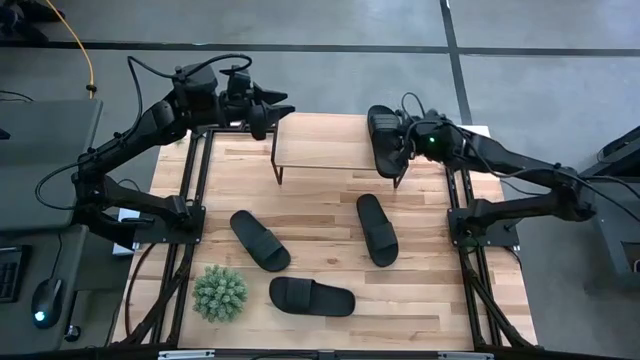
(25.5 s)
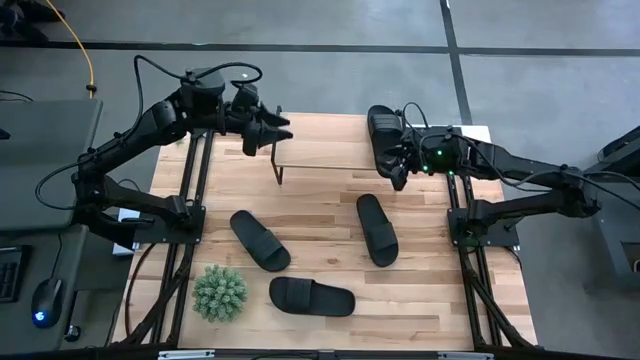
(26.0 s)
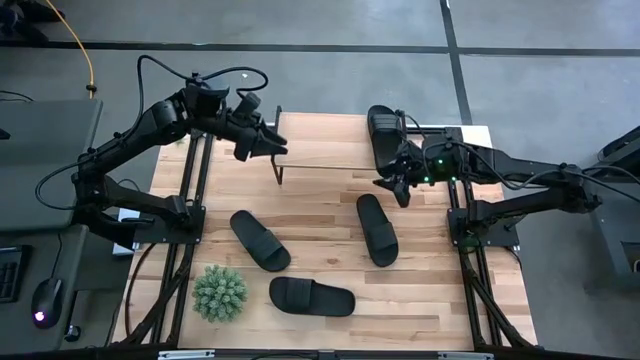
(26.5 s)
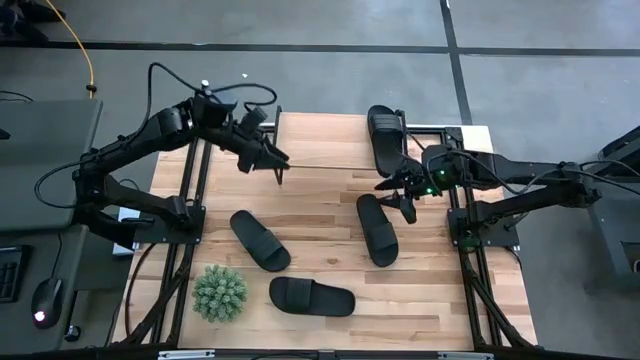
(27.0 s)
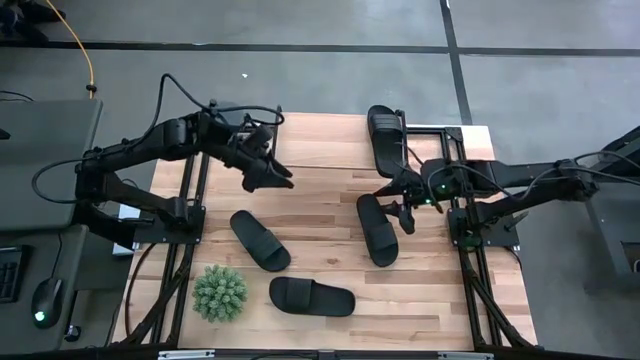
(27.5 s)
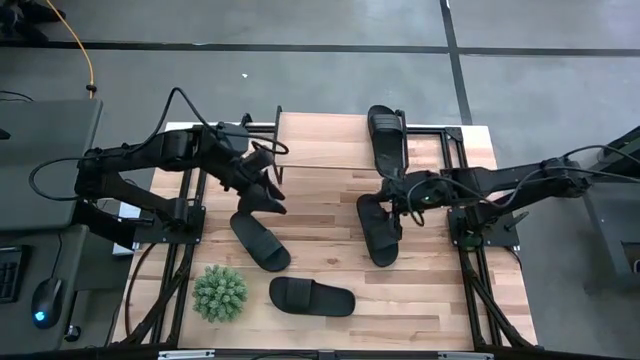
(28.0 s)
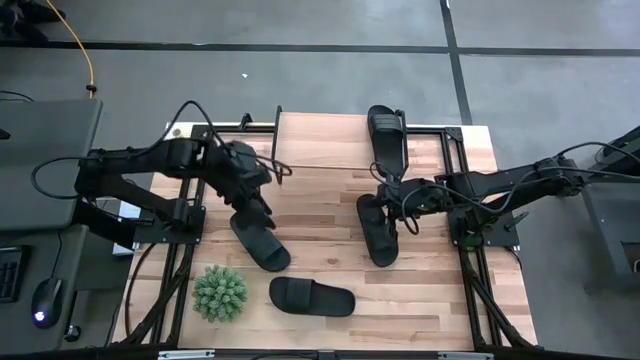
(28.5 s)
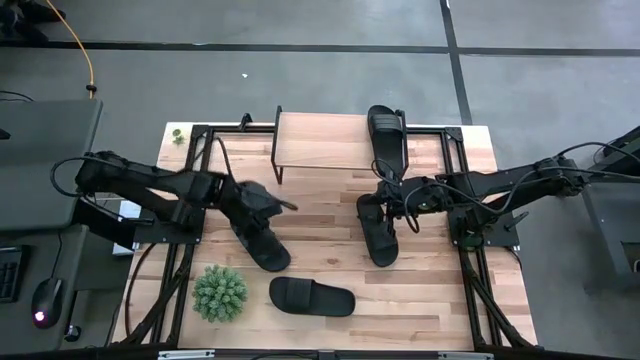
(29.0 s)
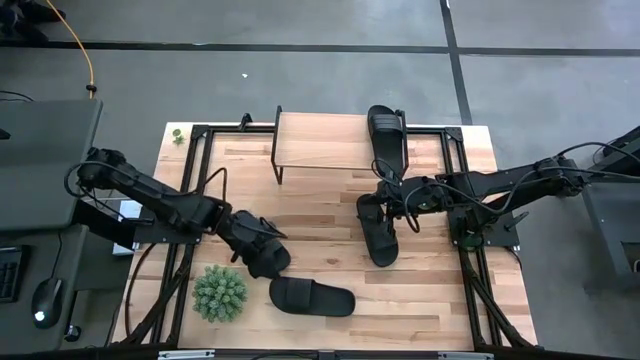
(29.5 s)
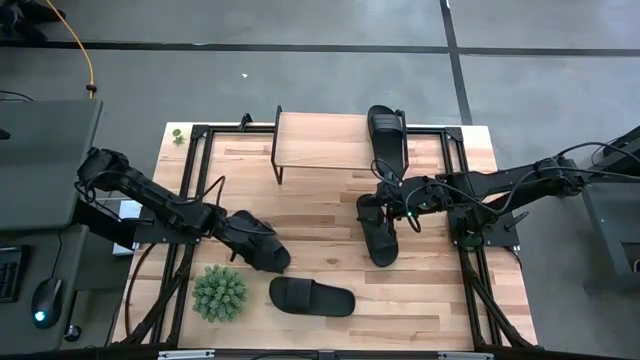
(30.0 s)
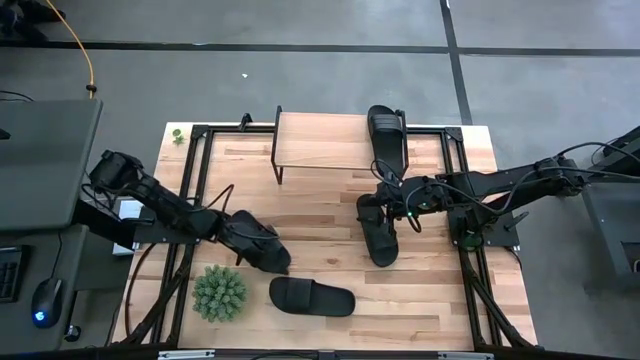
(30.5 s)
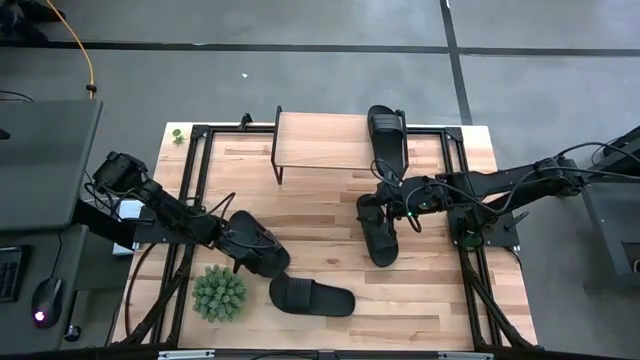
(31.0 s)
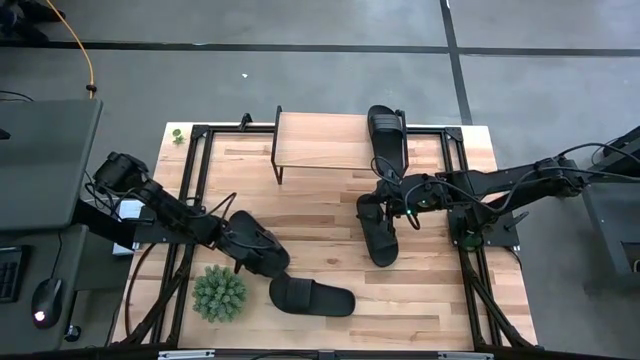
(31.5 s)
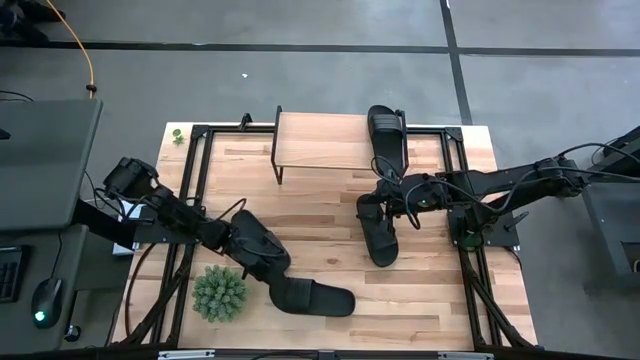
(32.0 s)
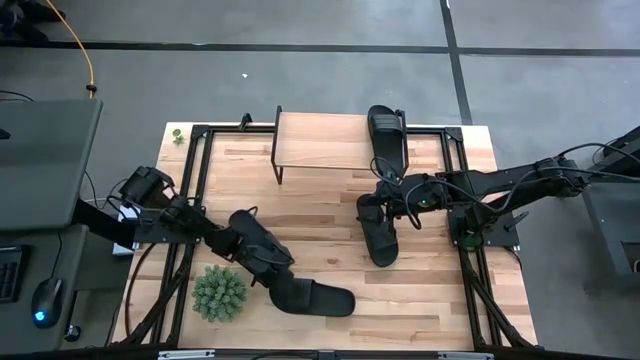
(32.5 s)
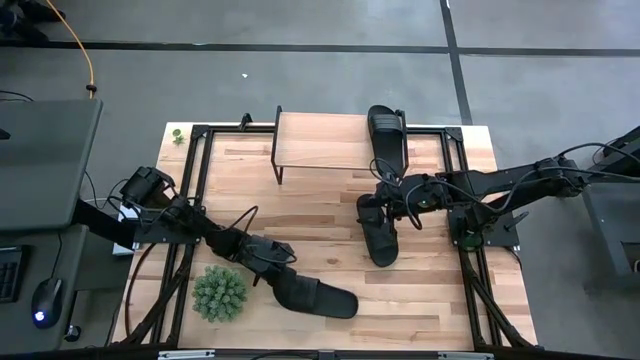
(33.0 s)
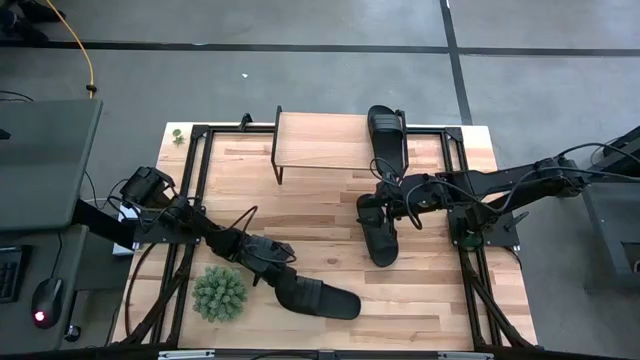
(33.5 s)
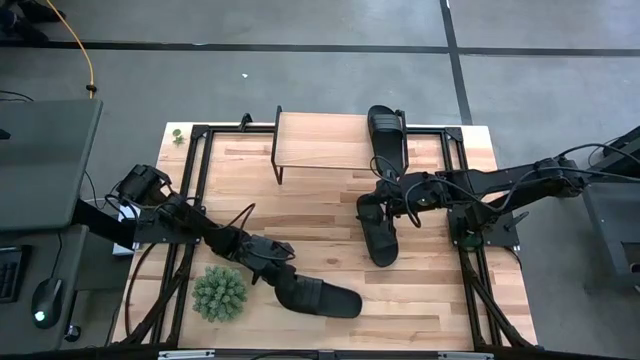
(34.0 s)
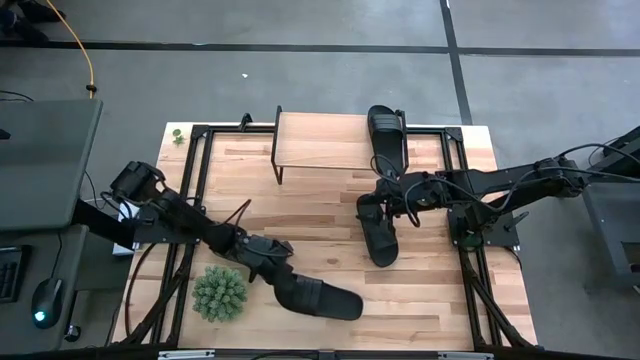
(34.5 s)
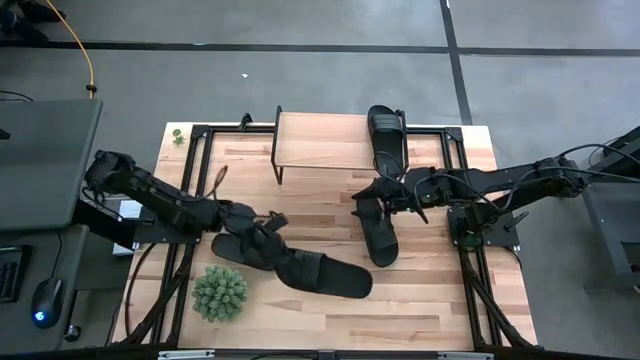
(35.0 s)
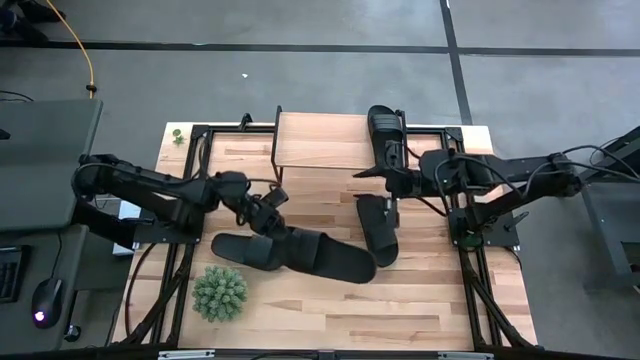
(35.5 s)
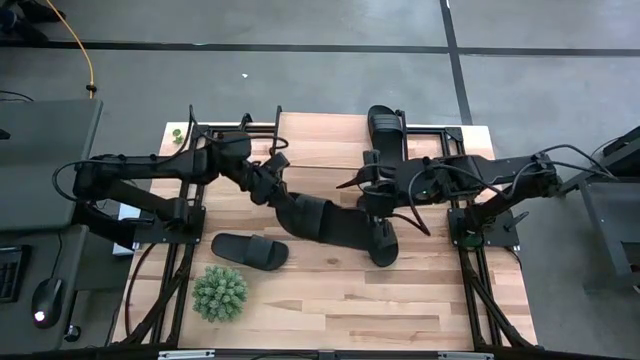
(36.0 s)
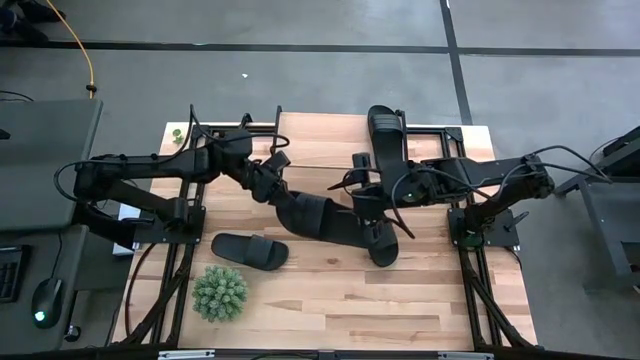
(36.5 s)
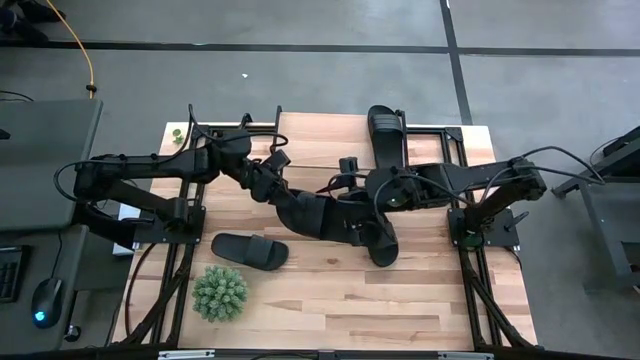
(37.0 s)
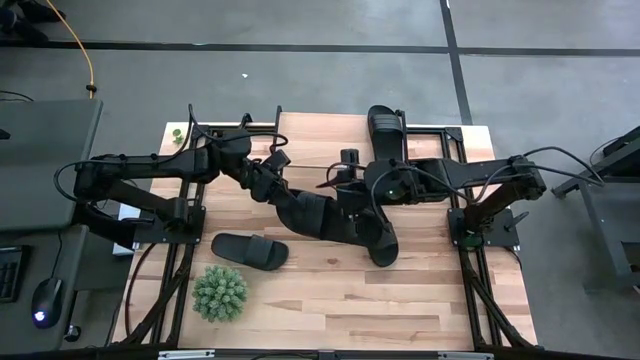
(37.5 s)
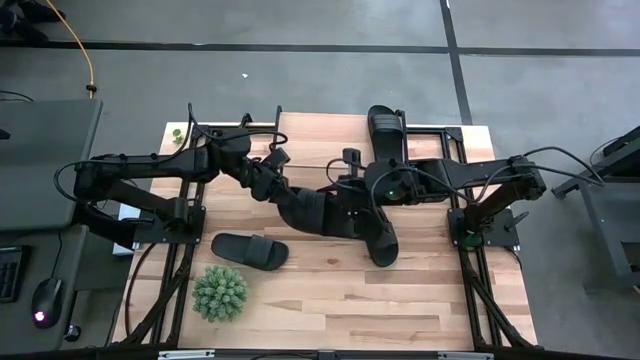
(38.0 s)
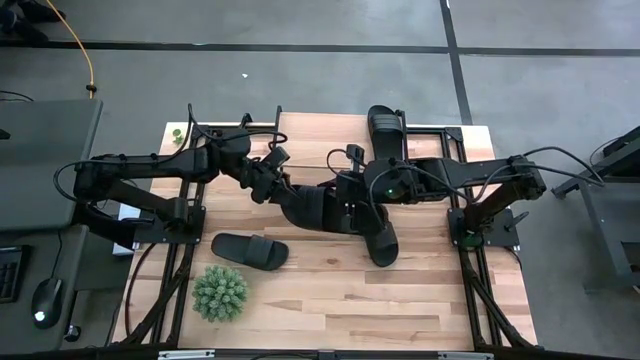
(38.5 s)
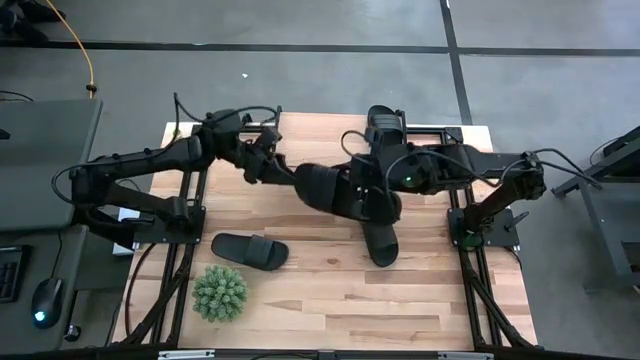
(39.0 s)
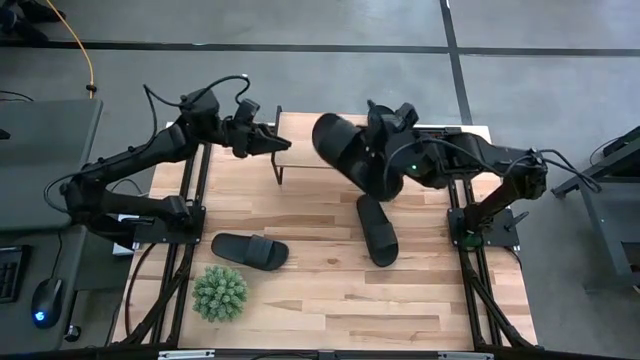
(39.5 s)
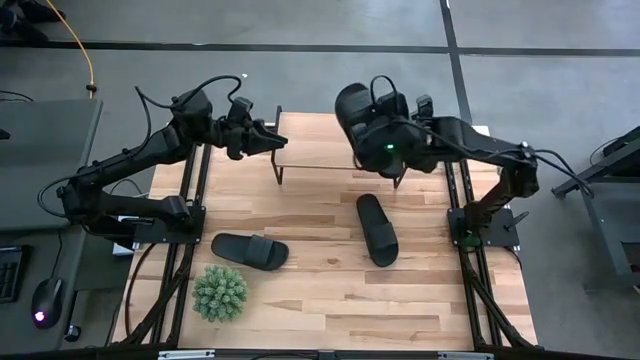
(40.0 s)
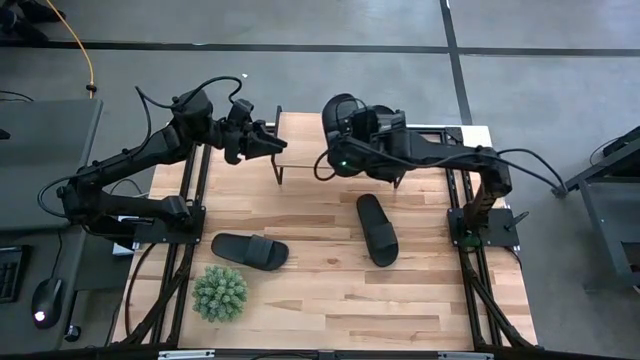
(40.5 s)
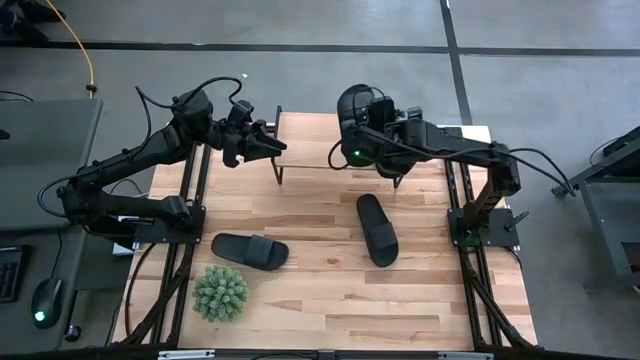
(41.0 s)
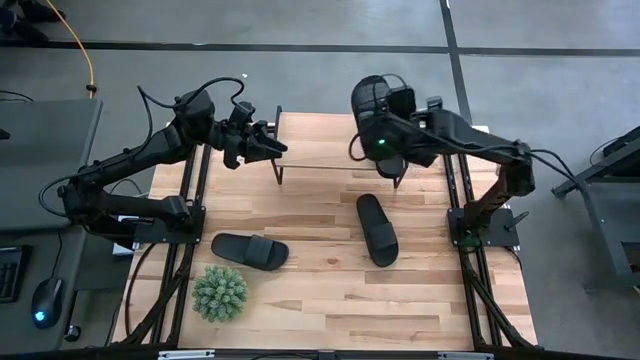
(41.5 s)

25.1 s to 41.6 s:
Task: Pick and place slides into the shelf
Put the black slipper on the shelf

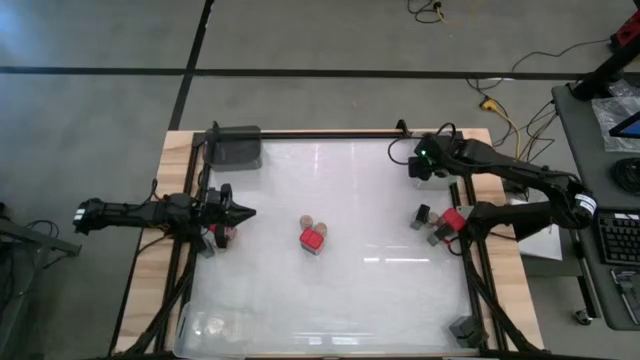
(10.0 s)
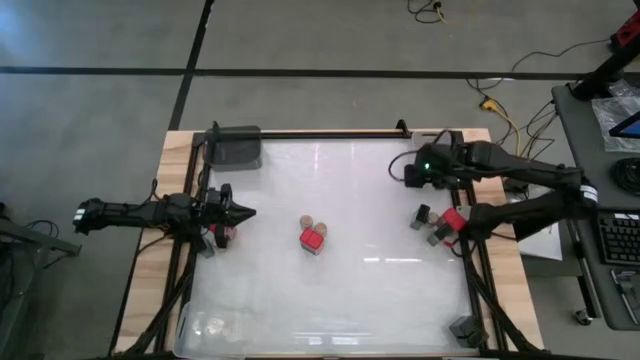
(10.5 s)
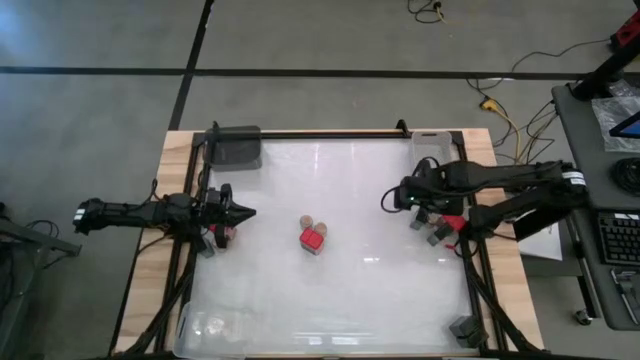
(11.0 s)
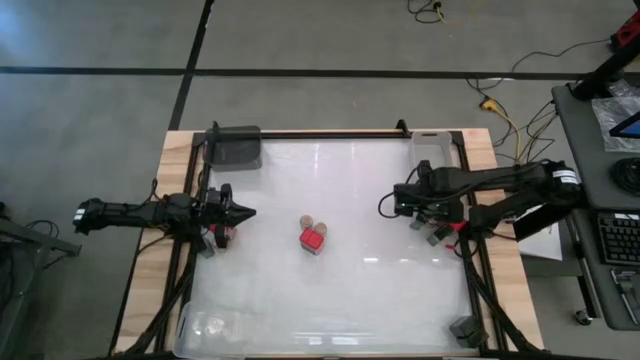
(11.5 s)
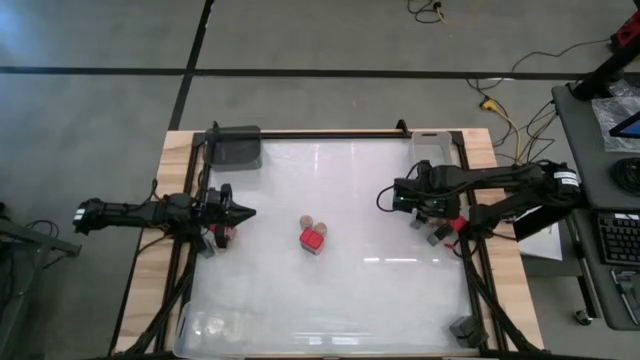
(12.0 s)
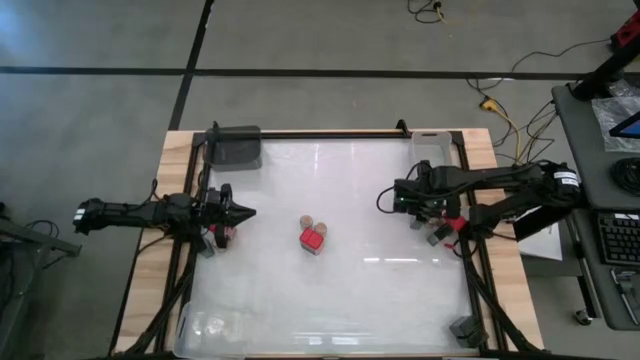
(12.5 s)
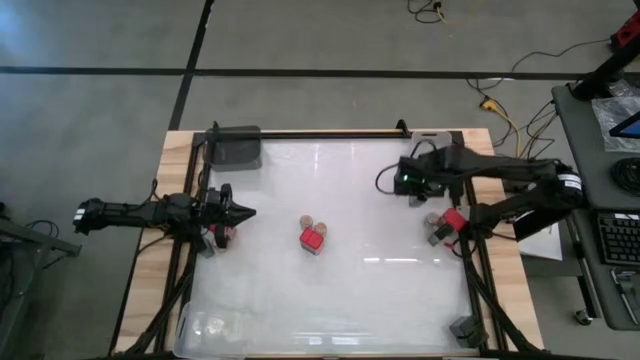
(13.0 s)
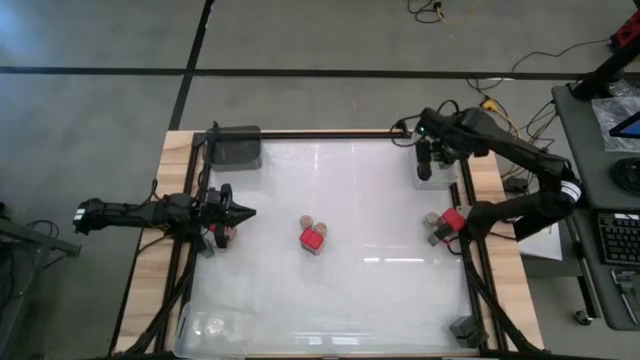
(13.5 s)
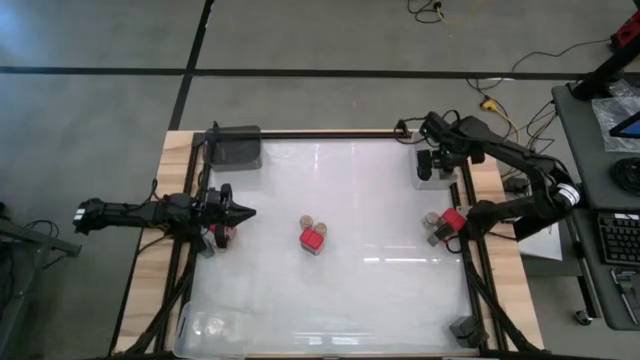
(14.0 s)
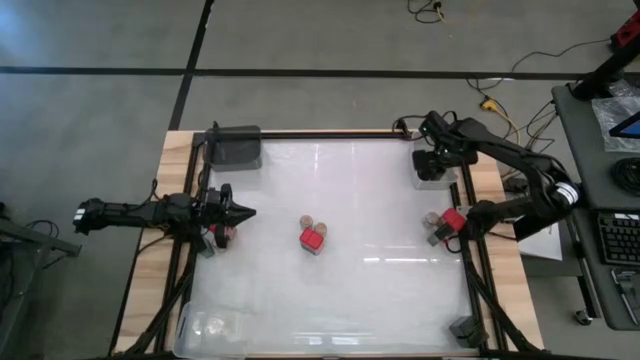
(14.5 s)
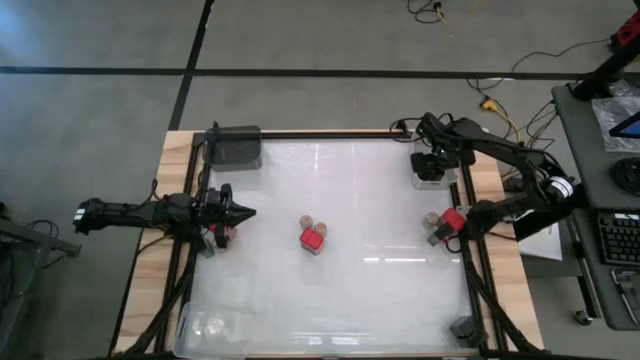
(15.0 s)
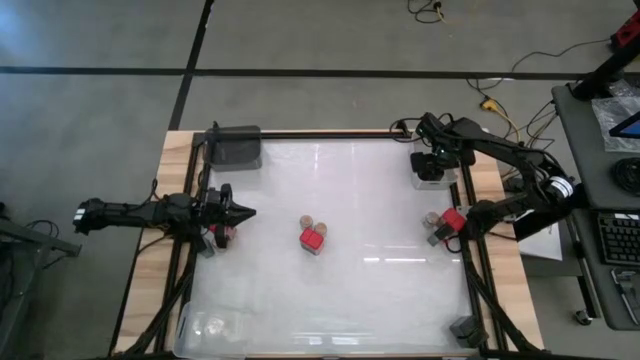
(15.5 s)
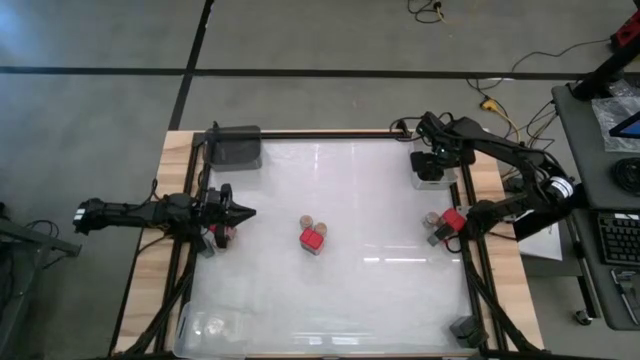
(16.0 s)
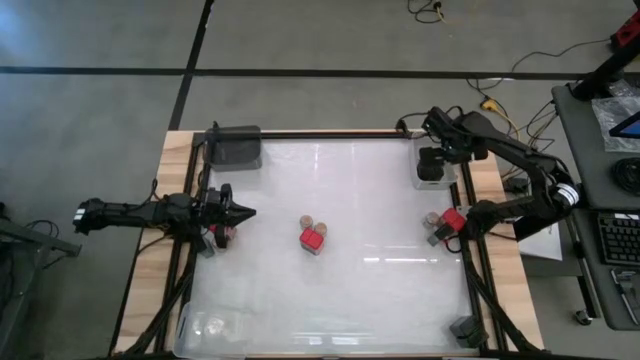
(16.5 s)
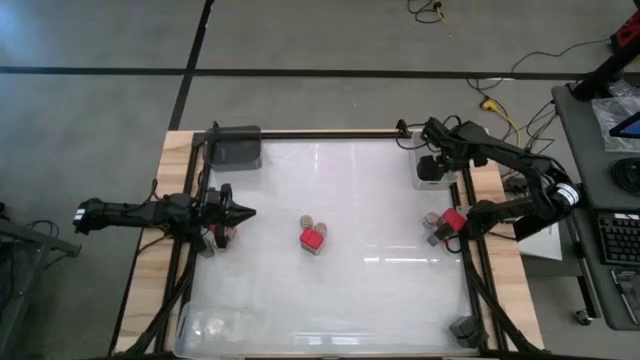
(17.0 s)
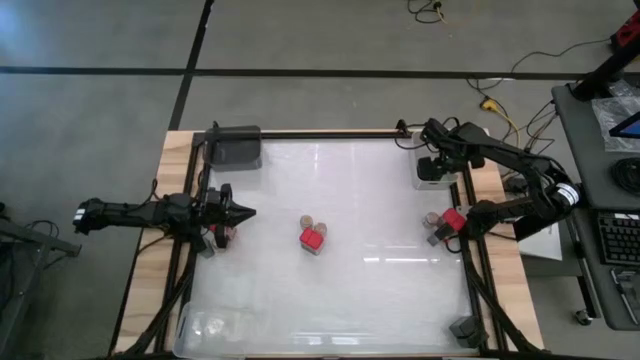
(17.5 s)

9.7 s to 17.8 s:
Task: Sort spices by type
Put the black seasoning can into the gray bin
